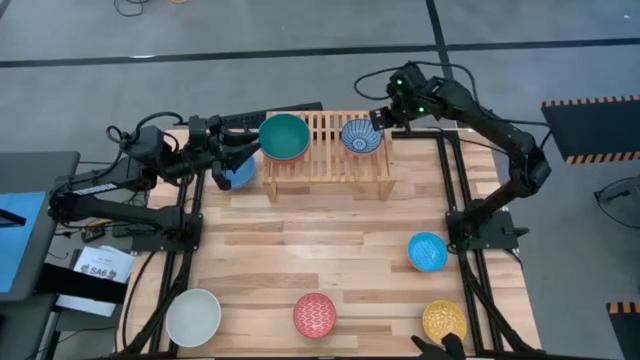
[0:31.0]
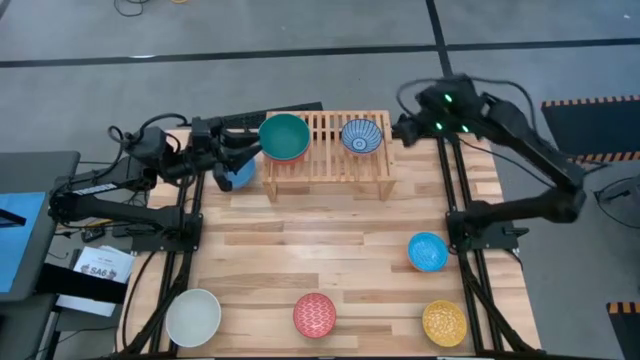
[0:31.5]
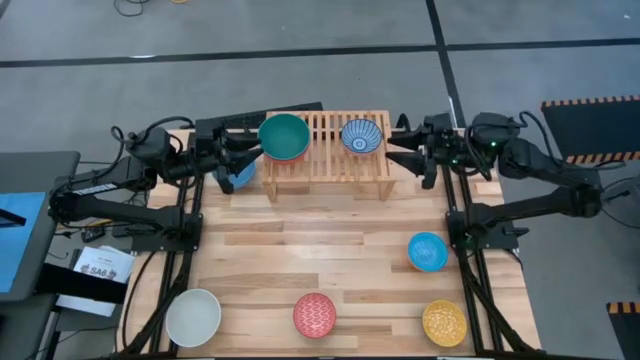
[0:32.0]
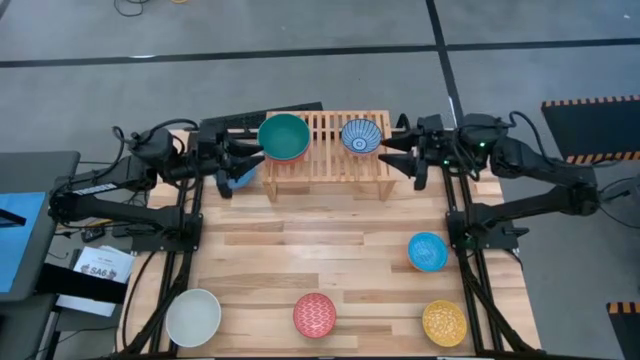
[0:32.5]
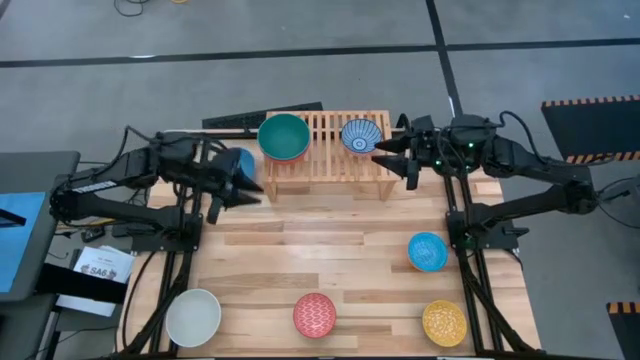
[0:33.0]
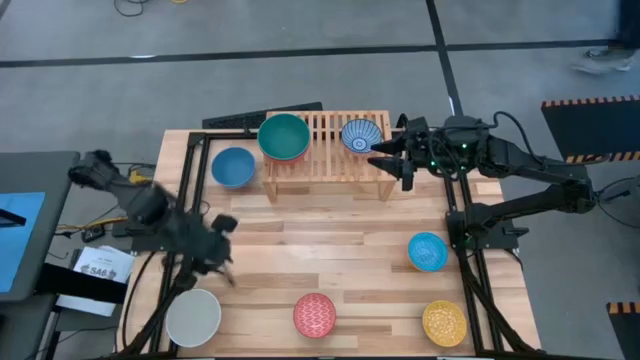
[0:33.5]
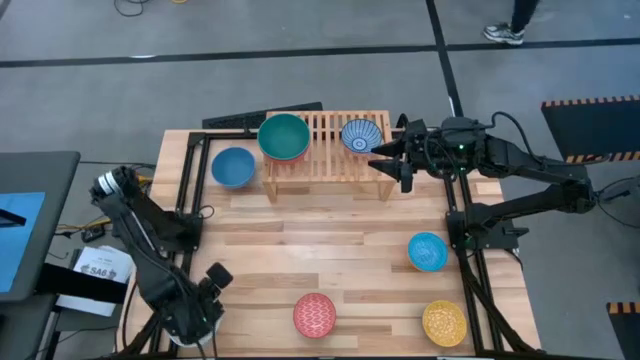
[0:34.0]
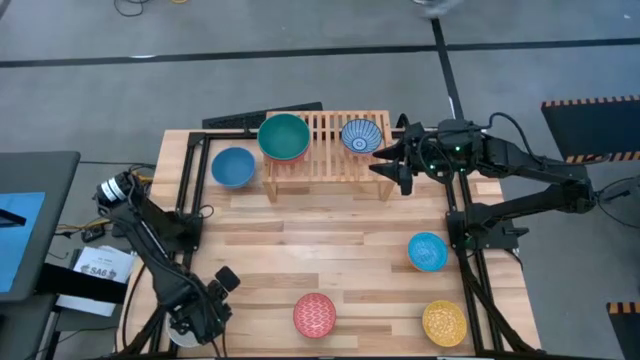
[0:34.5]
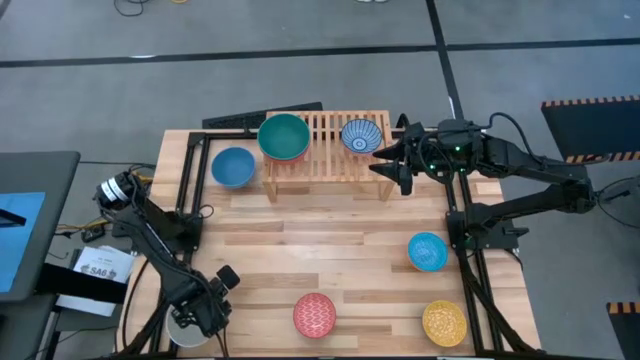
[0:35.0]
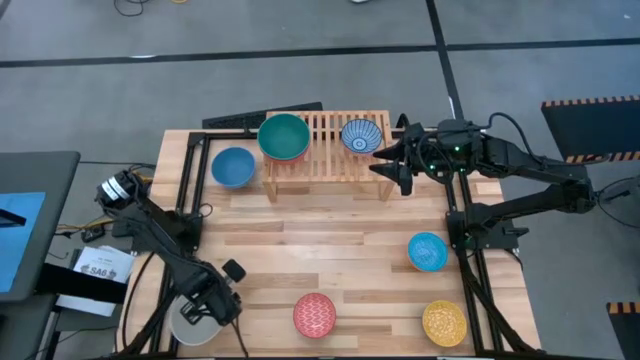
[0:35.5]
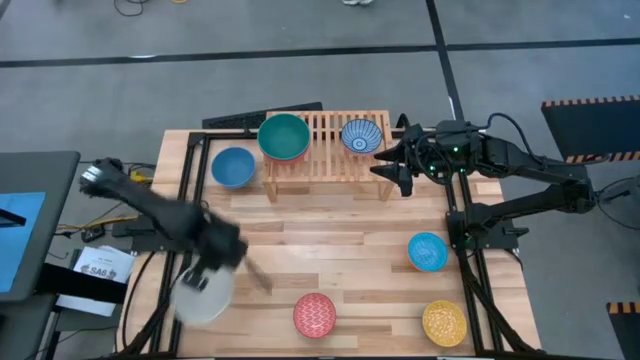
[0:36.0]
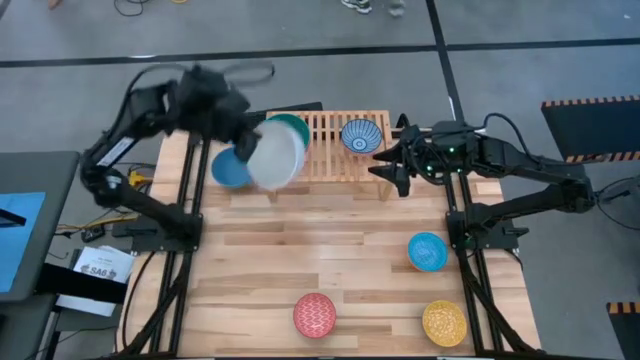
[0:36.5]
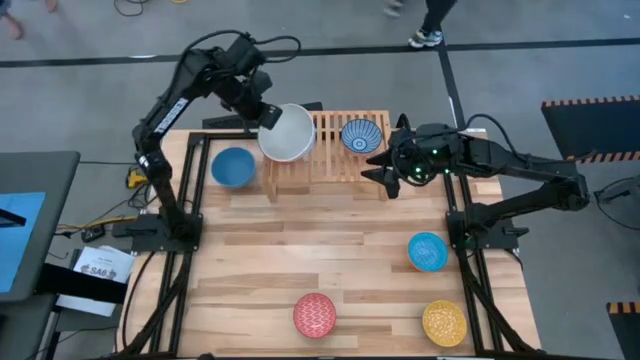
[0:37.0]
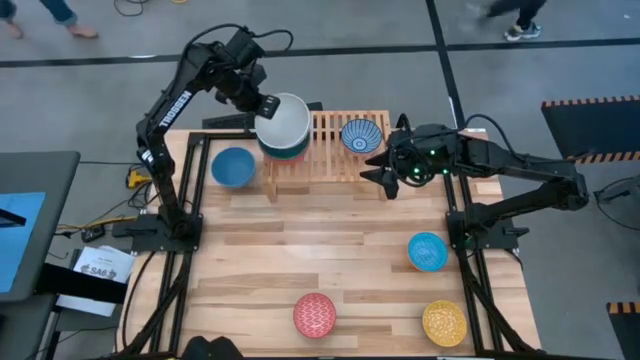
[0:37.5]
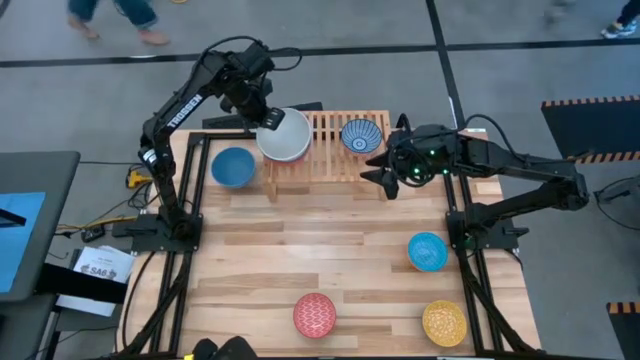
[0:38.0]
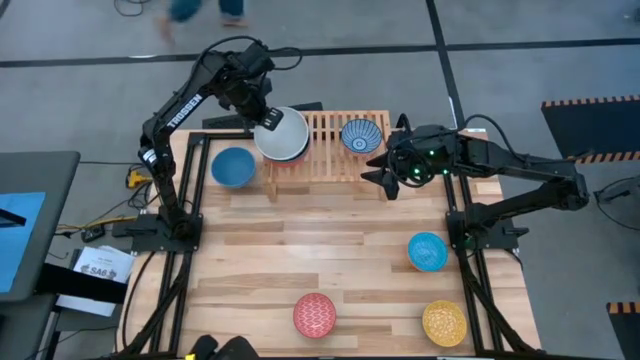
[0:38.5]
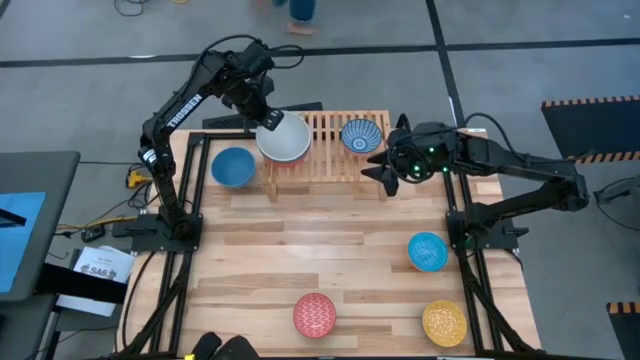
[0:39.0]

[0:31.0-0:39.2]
Task: Place and stack bowls onto a shelf
Stack the large white bowl on top of the large green bowl on the shelf

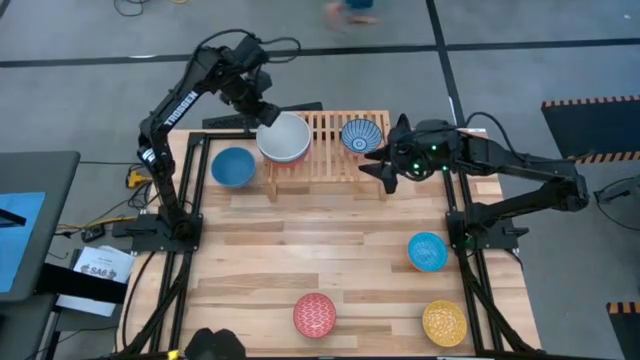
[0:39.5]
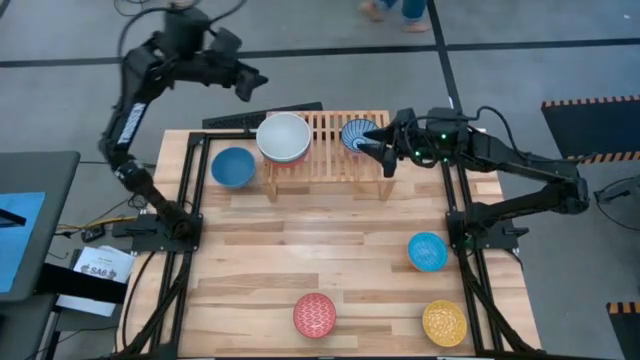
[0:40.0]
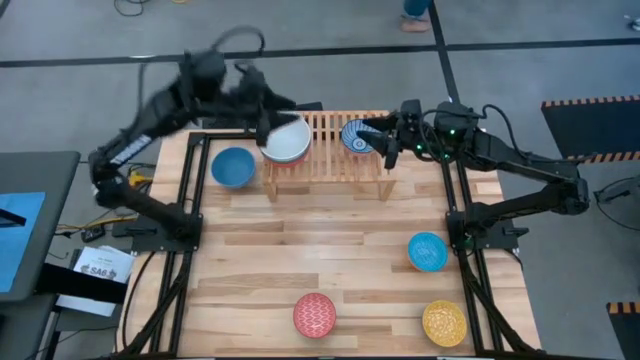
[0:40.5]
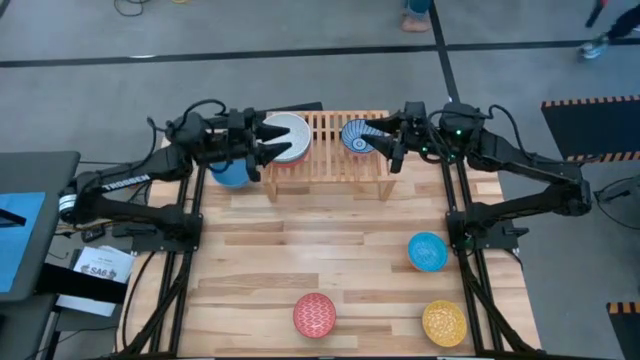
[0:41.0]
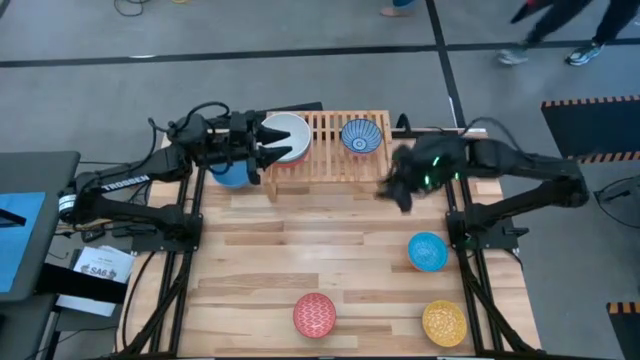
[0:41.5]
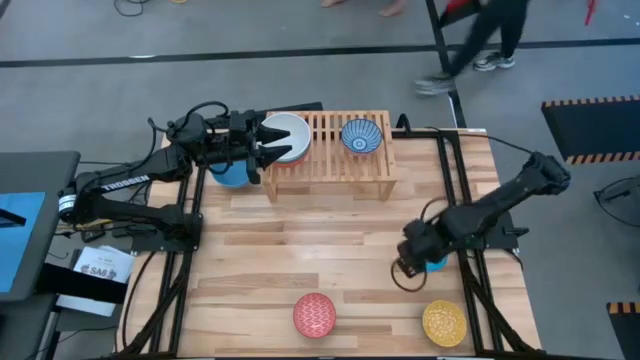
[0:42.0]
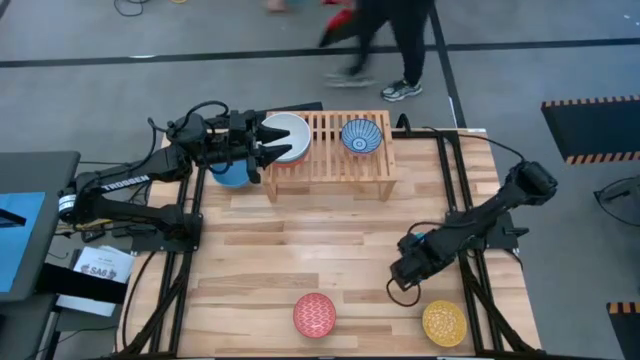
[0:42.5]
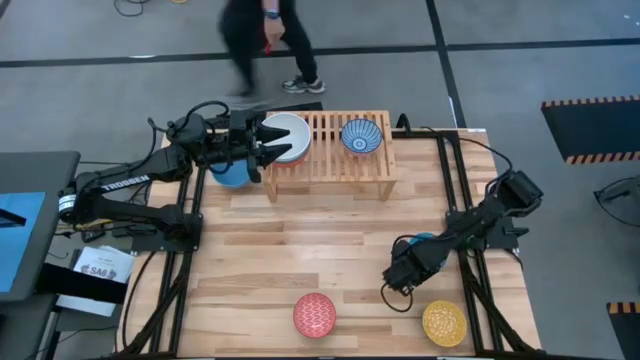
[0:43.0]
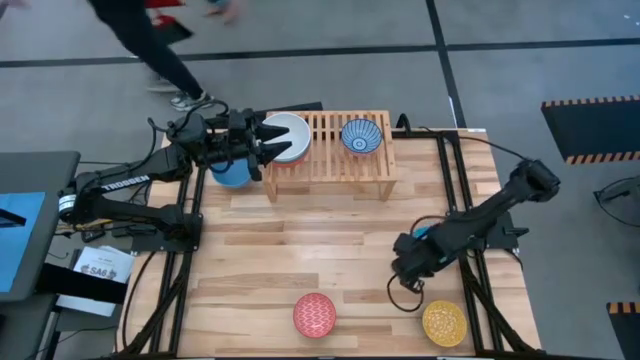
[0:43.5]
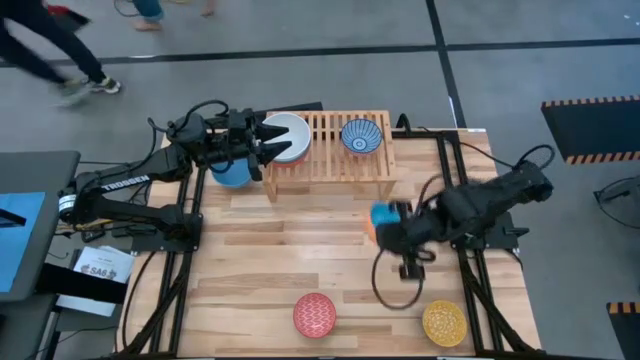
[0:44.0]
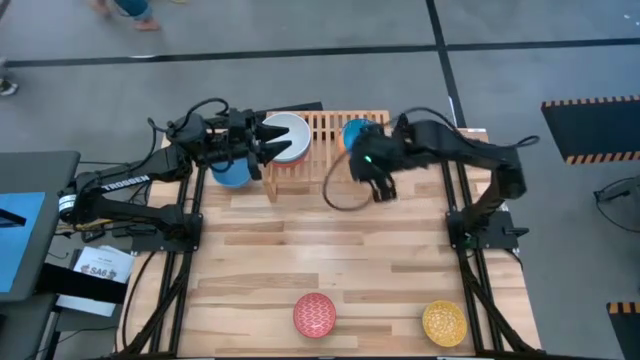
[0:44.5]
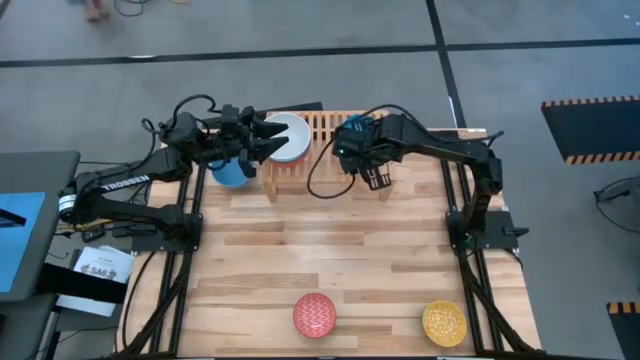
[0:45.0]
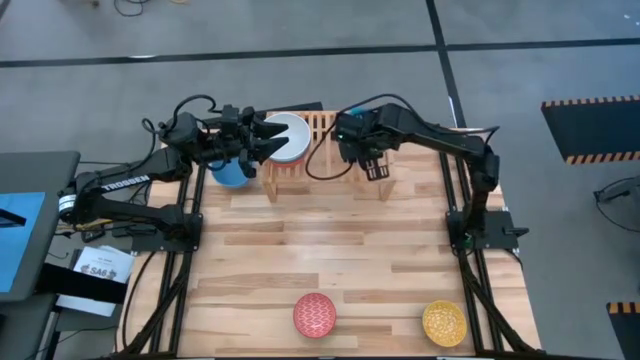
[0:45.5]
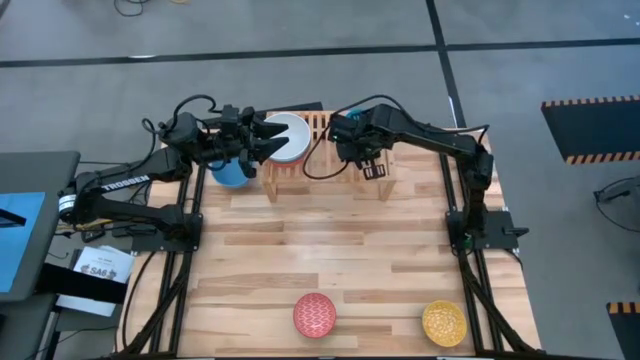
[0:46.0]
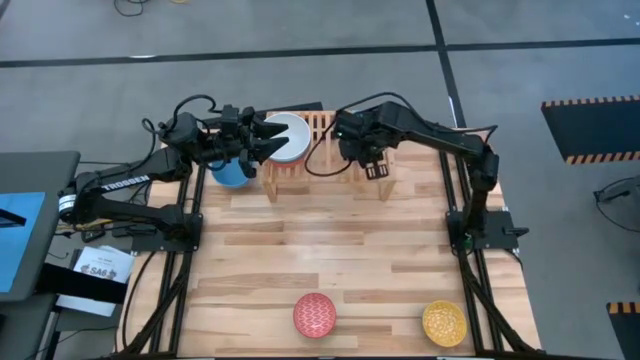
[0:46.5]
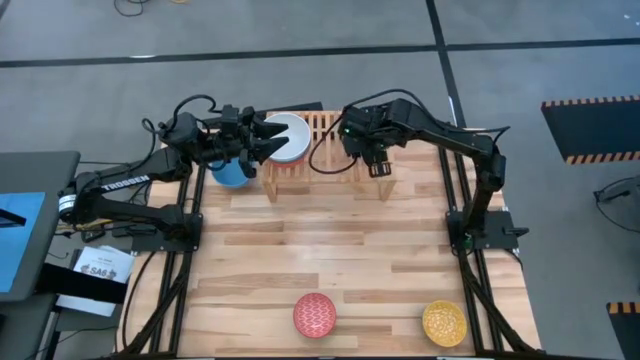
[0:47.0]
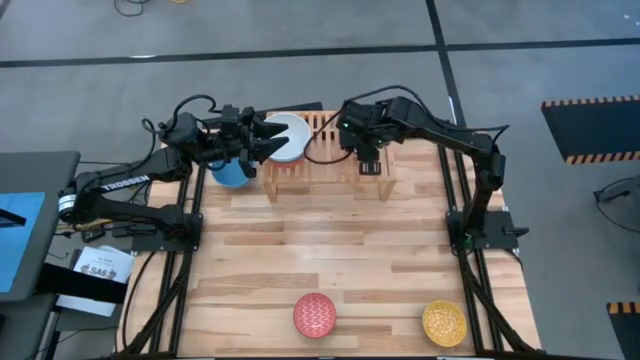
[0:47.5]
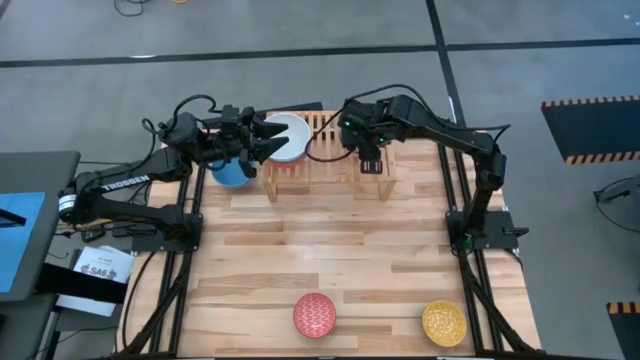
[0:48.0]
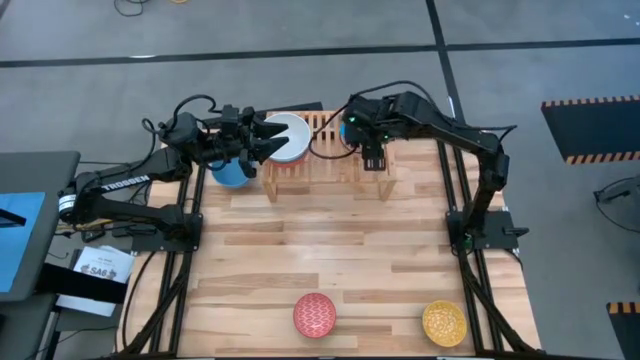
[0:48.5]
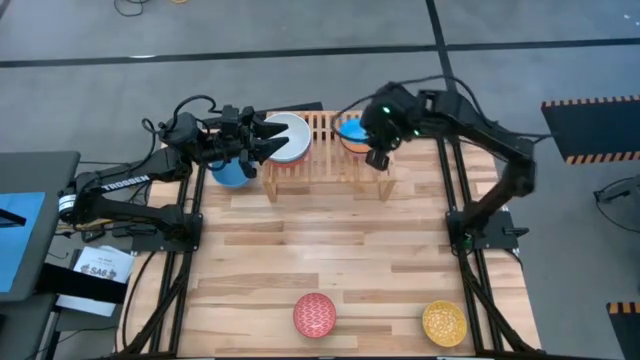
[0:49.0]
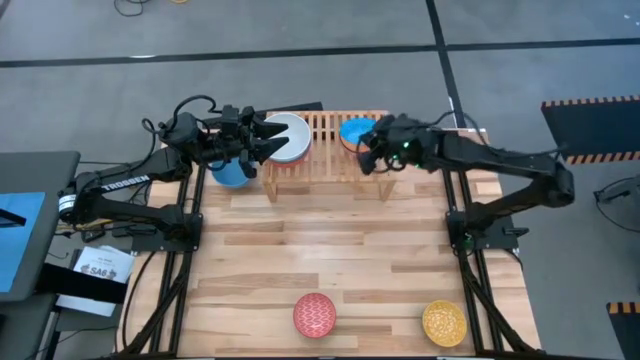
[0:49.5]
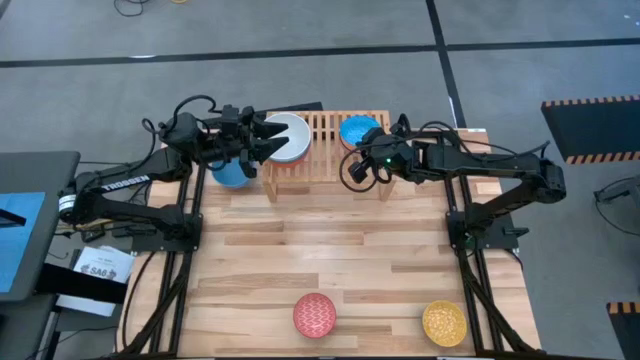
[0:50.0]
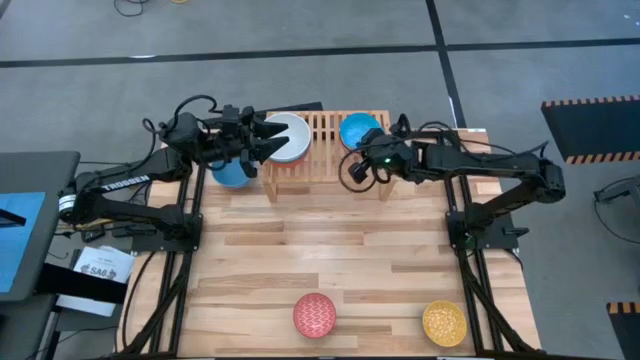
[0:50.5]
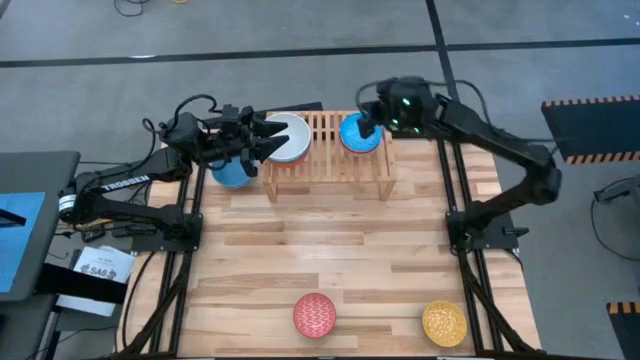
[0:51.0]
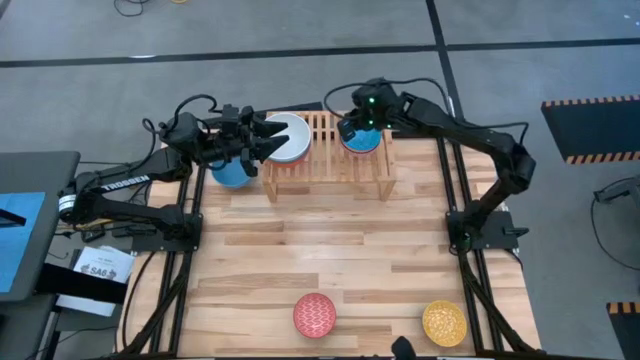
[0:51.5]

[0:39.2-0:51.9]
Stack the small light blue bowl on top of the small blue bowl on the shelf
